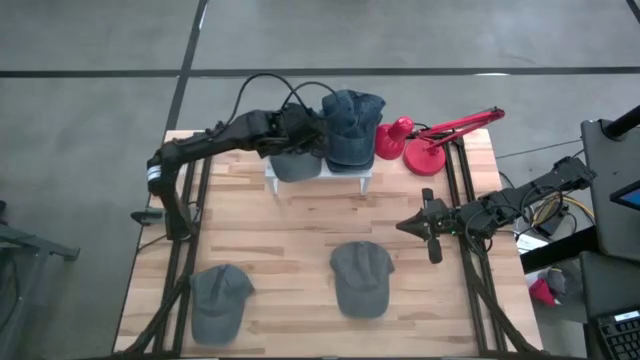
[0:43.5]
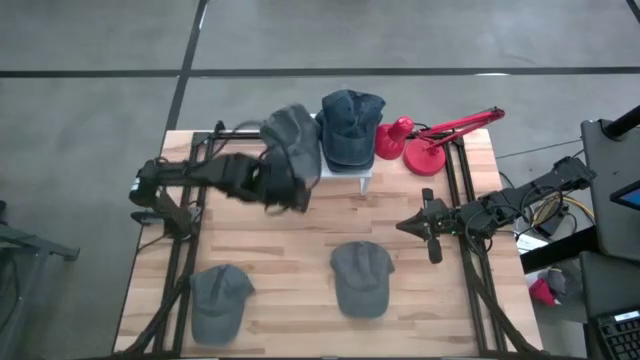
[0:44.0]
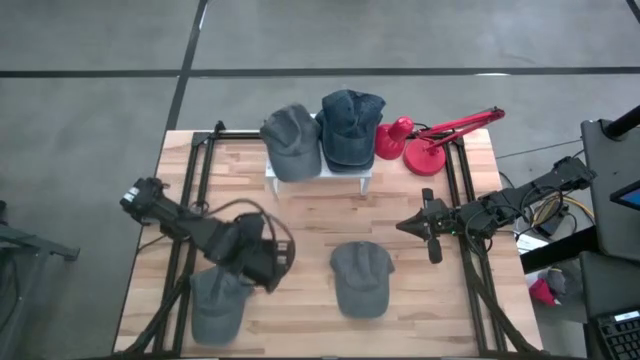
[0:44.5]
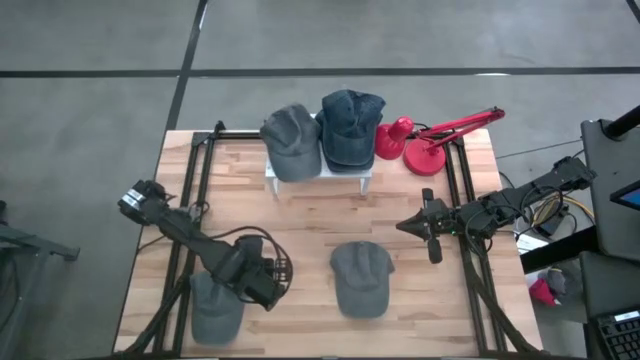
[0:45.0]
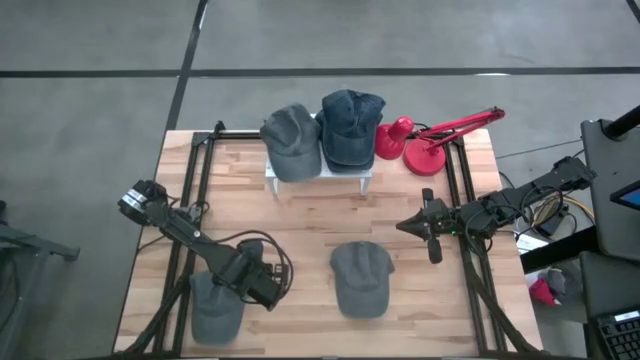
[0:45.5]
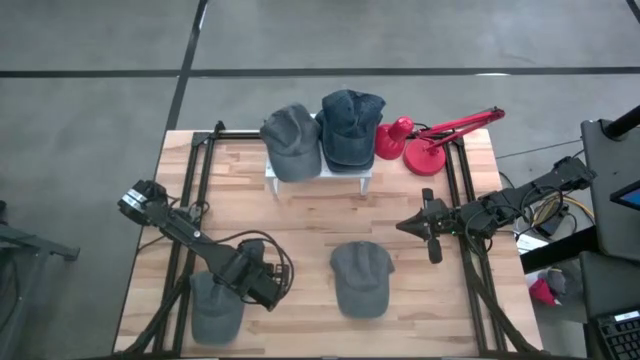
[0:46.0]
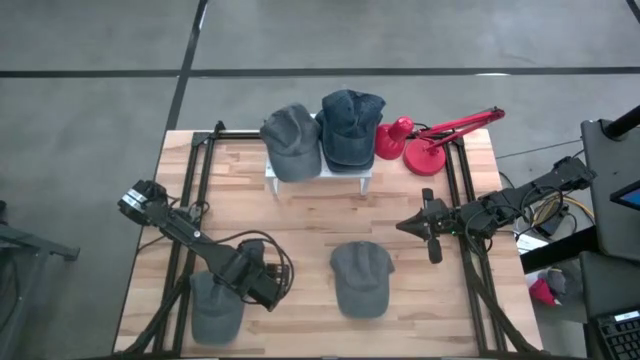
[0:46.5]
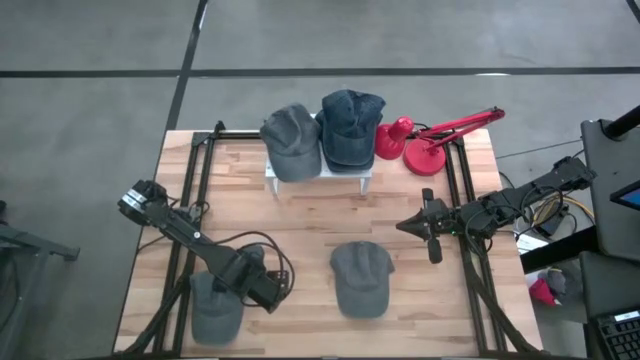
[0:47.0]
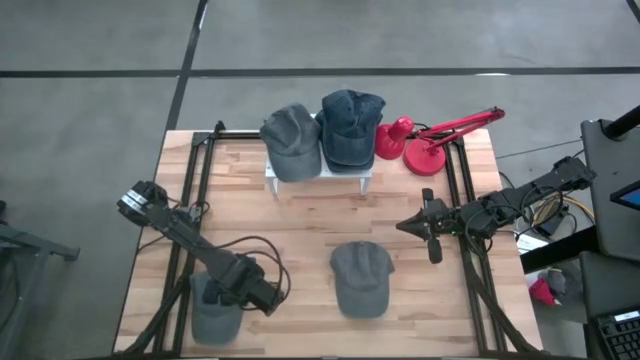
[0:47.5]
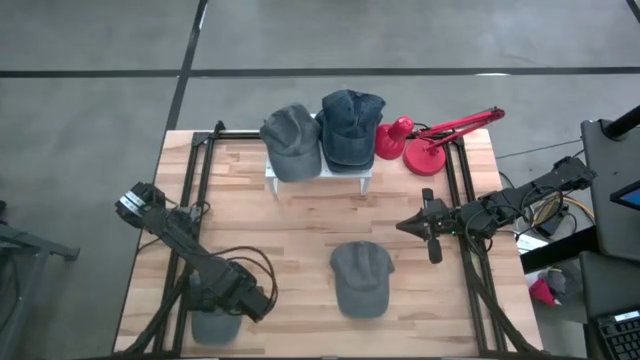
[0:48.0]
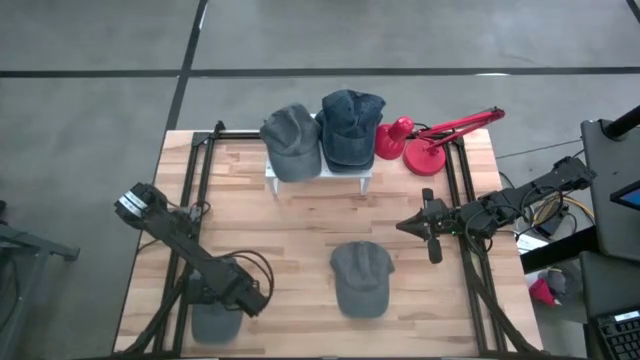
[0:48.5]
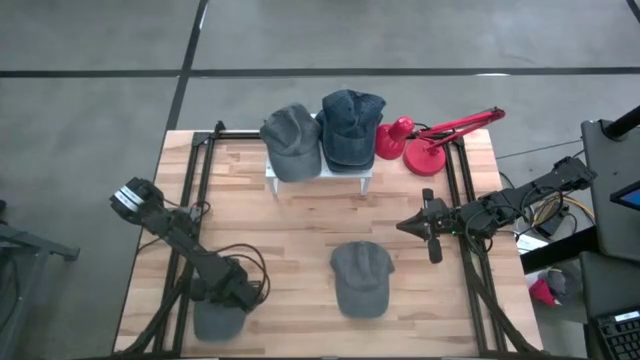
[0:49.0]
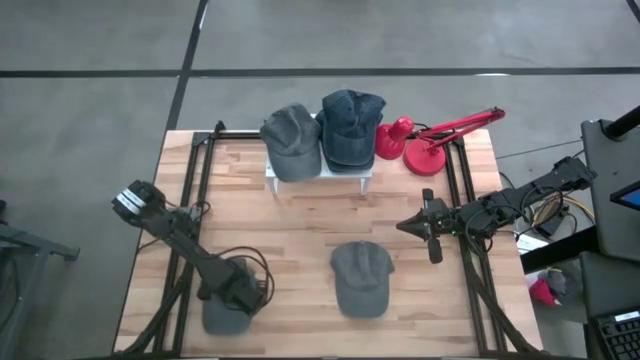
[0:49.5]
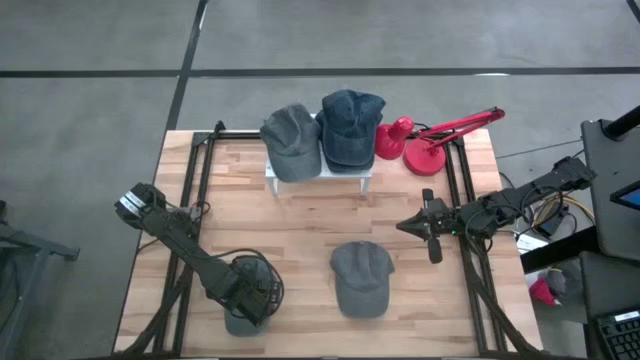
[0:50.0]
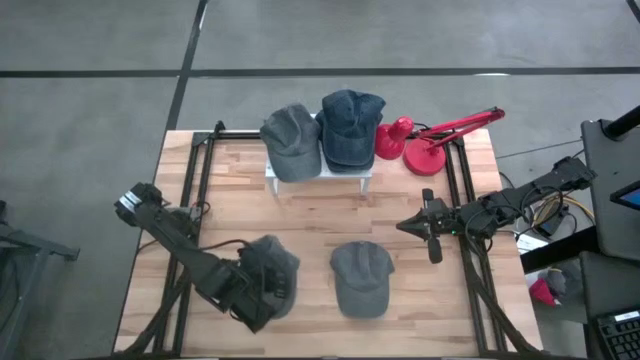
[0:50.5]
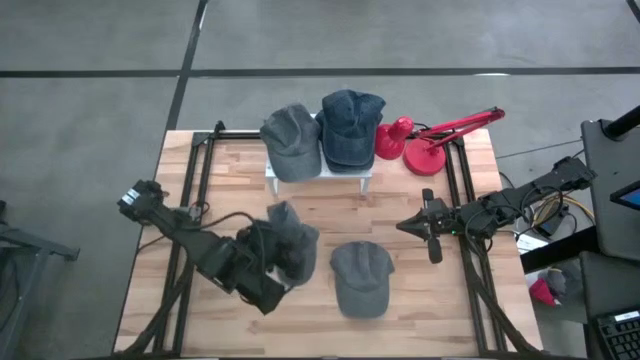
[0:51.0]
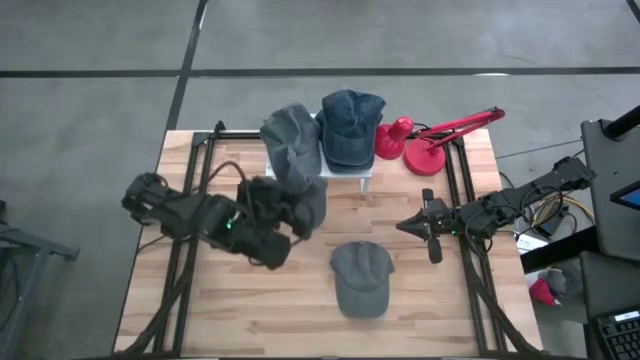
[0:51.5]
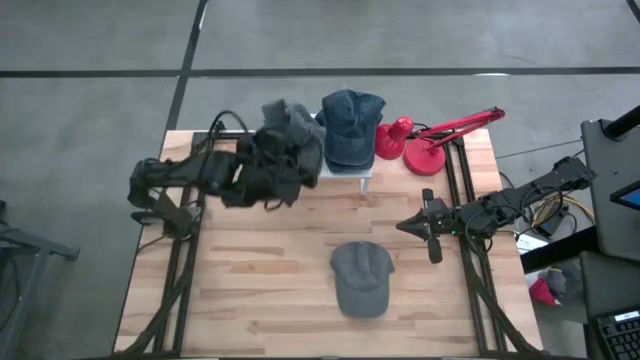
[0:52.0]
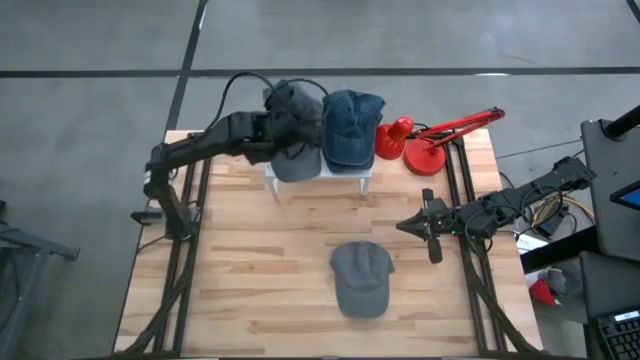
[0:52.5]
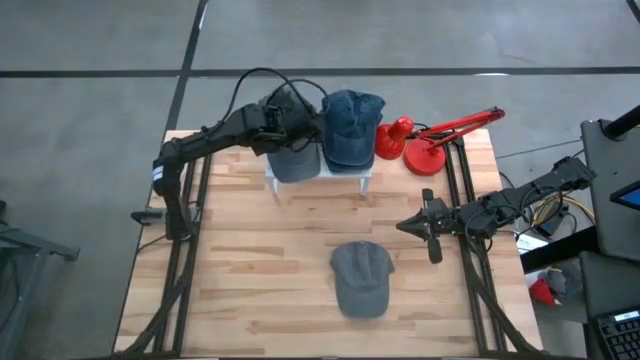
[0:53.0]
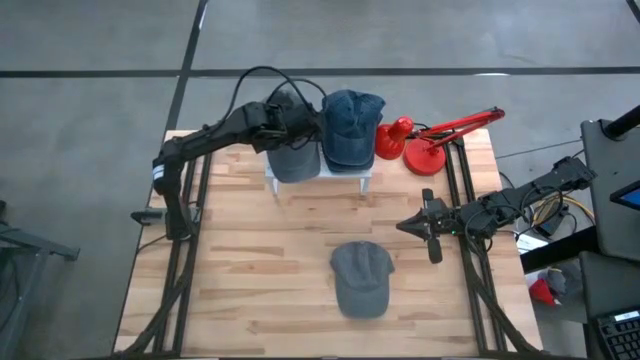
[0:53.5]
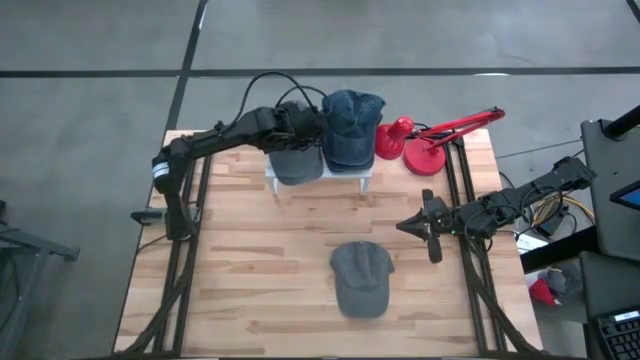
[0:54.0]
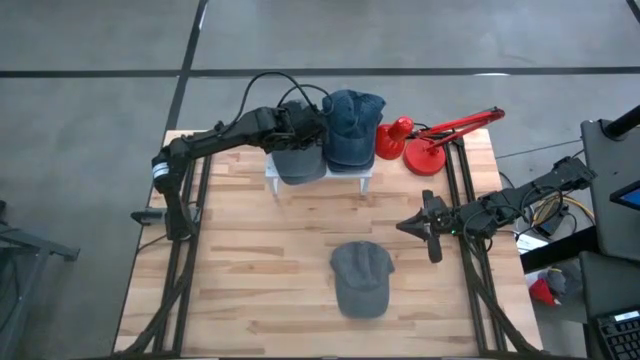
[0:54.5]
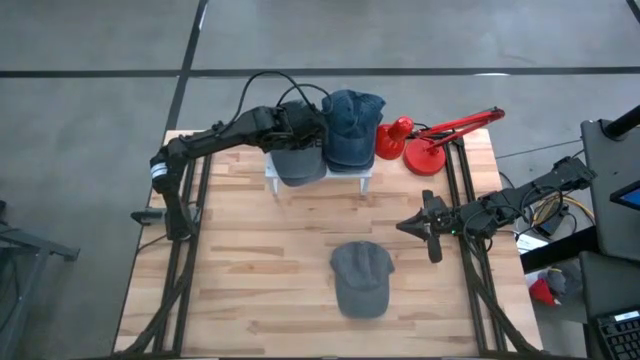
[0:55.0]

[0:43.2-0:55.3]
Task: Pick & Place hat
Stack the left gray cap on the gray cap on the shelf

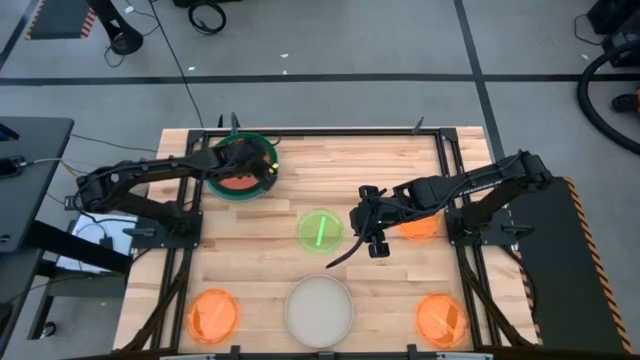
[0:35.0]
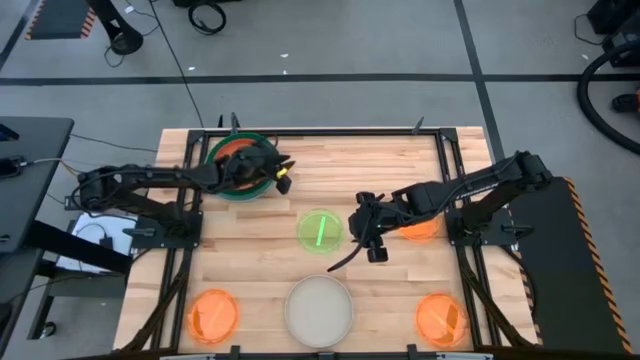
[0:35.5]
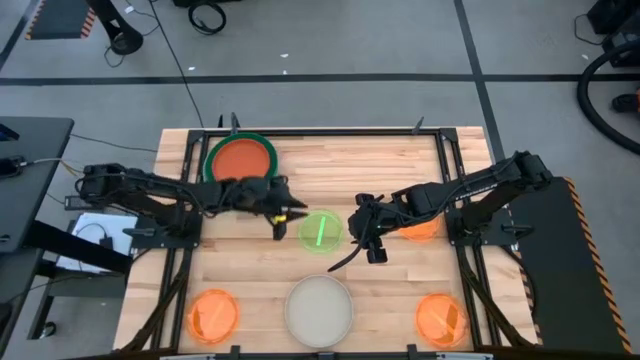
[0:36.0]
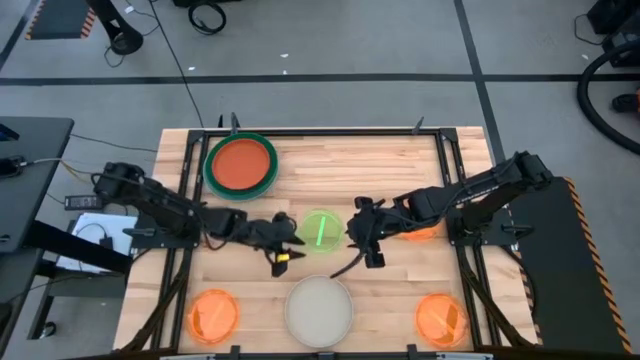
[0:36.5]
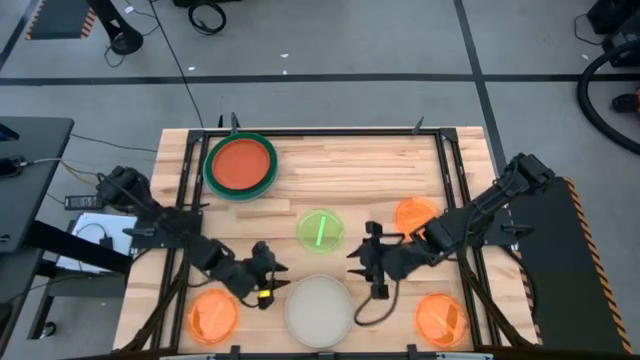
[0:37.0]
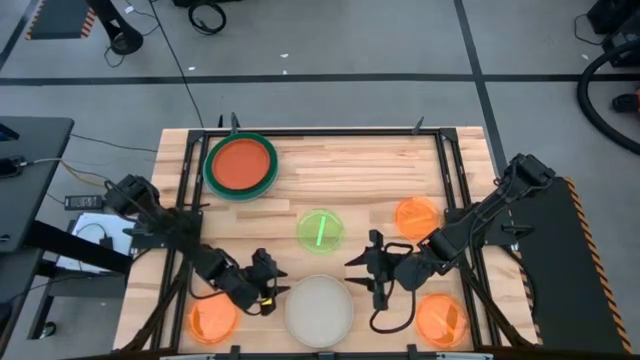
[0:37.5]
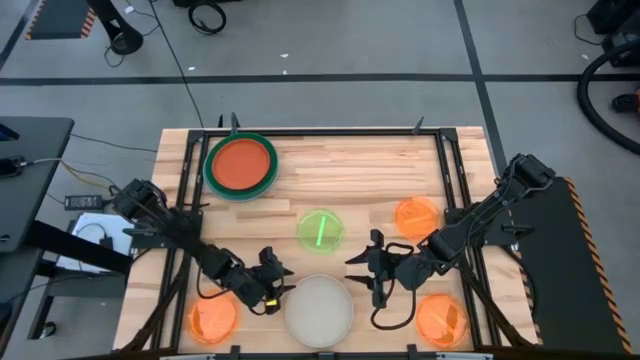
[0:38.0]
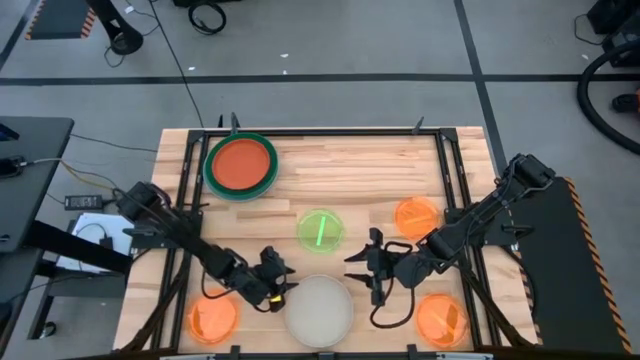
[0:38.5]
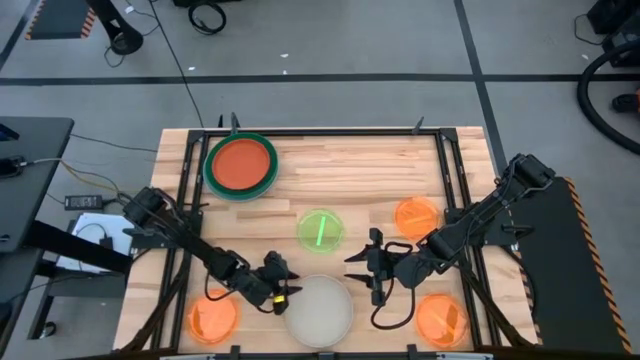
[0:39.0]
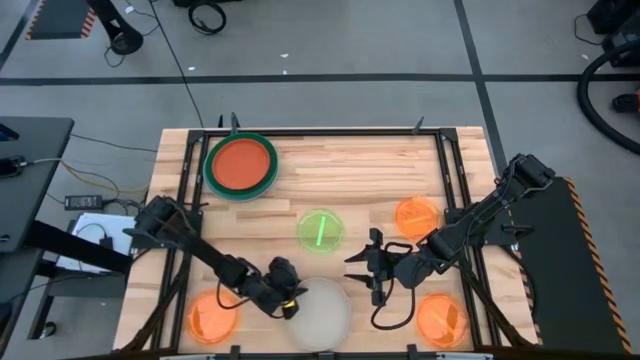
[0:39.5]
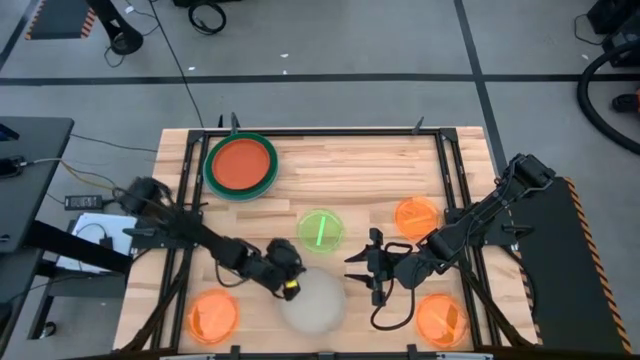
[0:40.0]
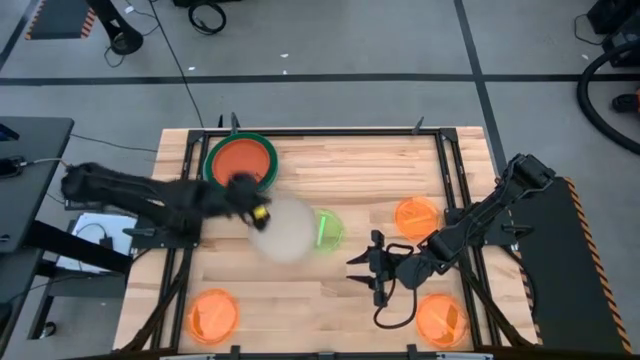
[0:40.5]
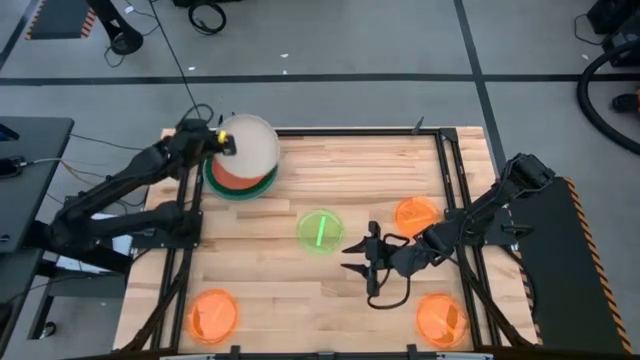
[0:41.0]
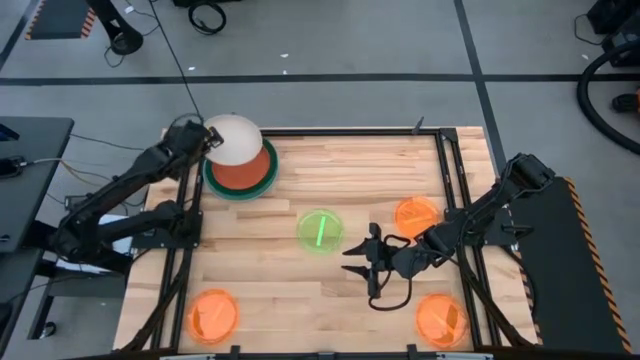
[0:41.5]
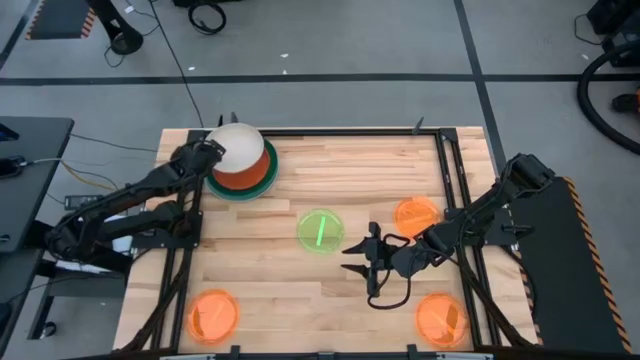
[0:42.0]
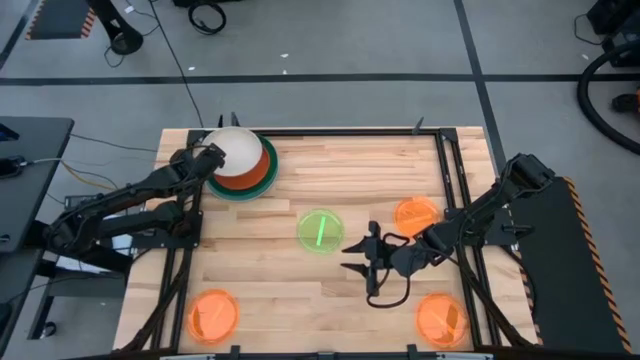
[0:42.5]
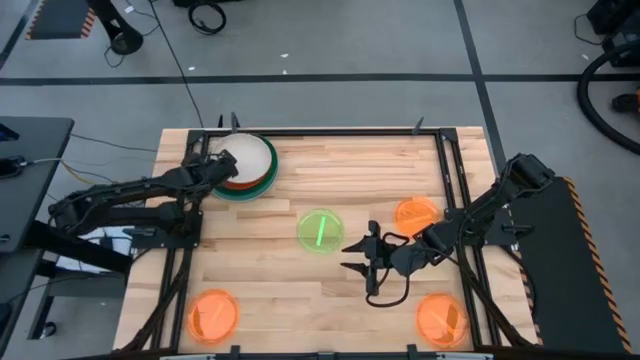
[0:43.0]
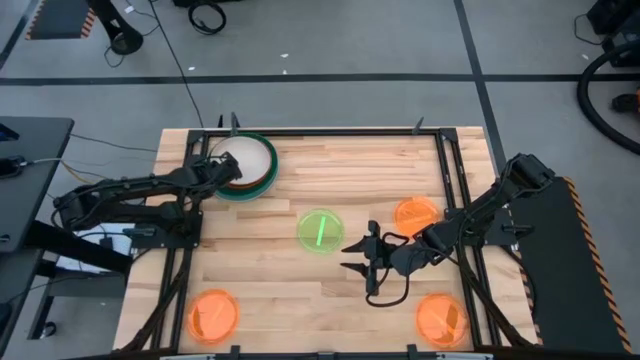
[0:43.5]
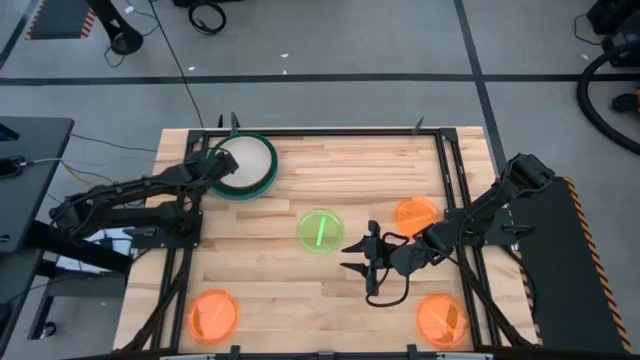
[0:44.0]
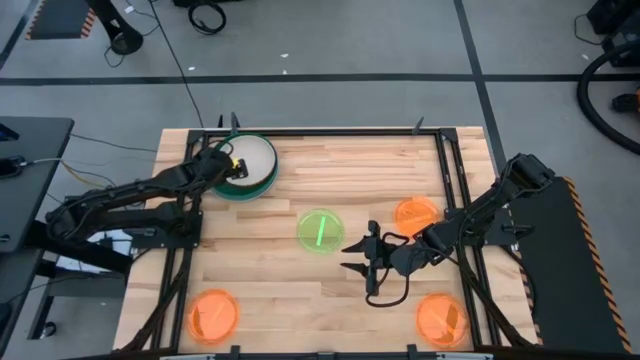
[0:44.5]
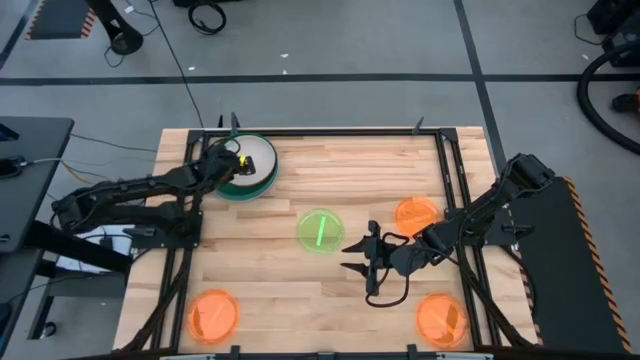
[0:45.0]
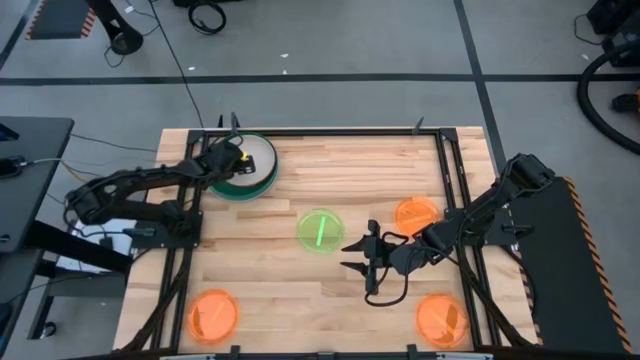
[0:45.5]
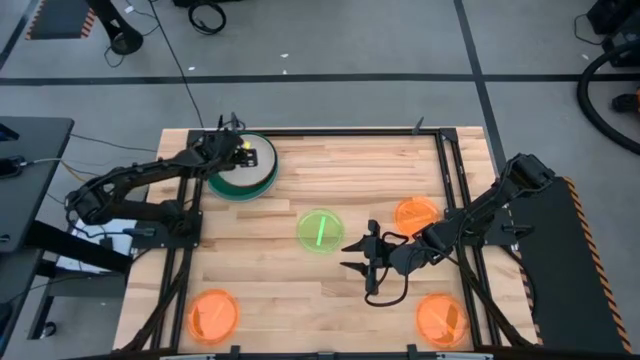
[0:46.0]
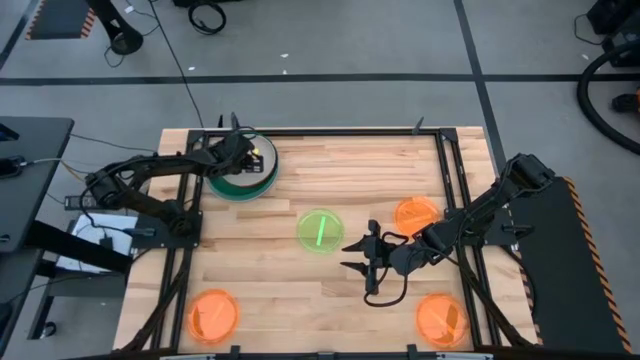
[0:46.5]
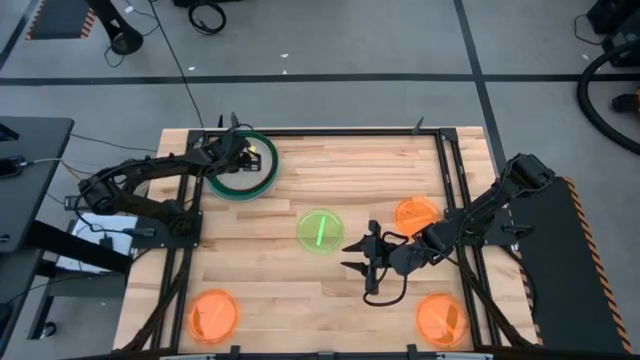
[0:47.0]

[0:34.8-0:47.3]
Task: Stack plastic plates
Stack the white plate on top of the orange plate
